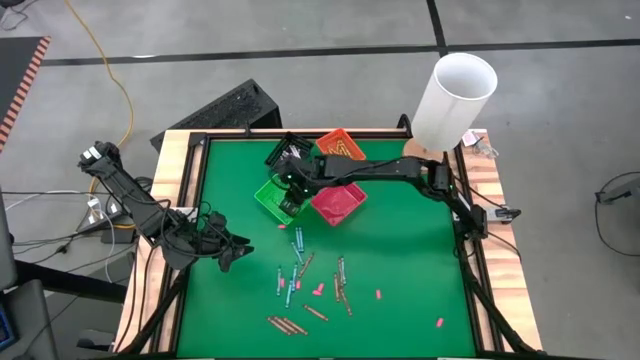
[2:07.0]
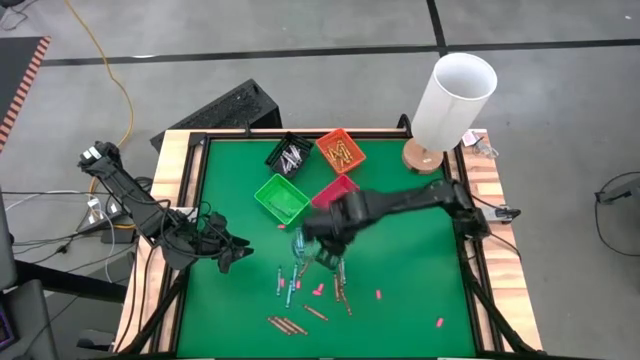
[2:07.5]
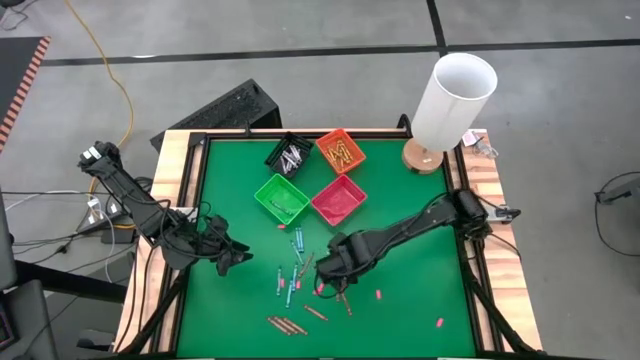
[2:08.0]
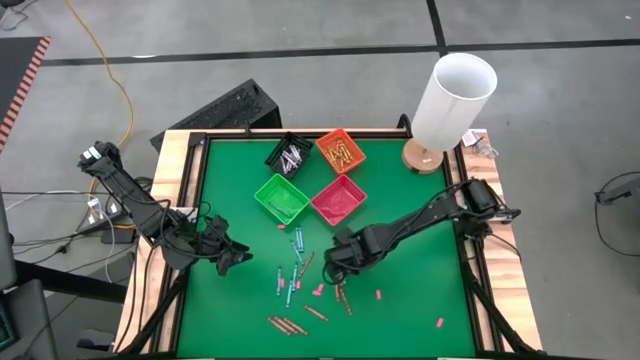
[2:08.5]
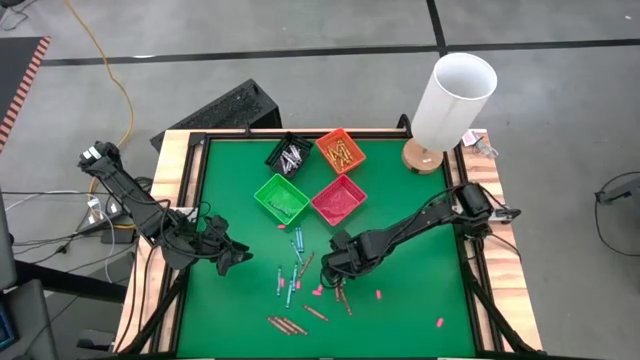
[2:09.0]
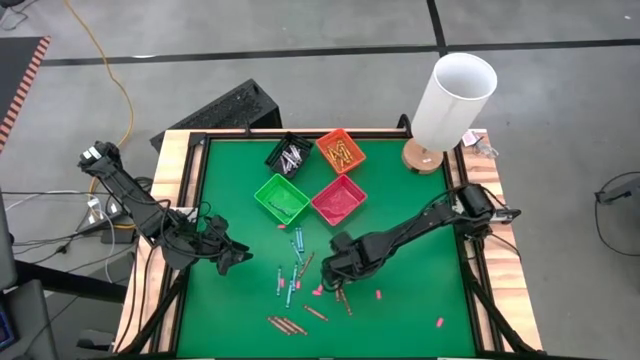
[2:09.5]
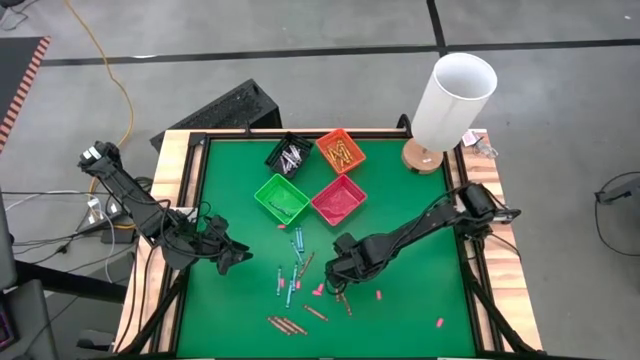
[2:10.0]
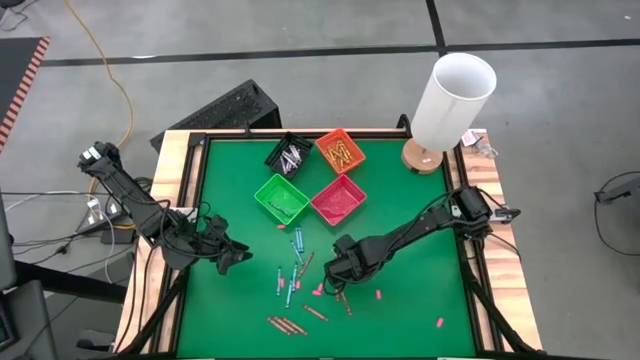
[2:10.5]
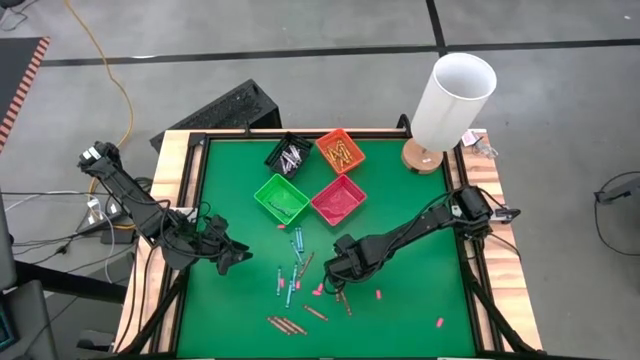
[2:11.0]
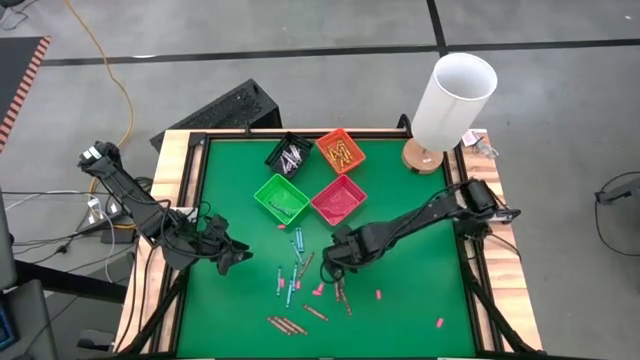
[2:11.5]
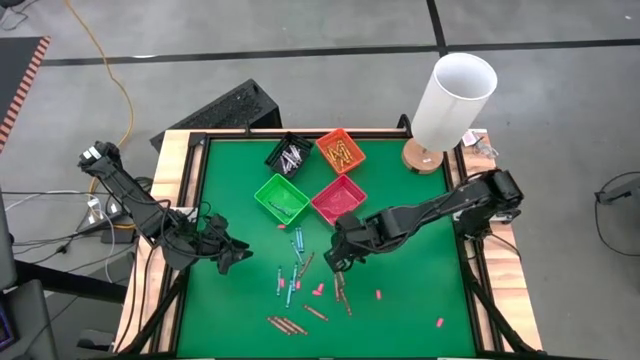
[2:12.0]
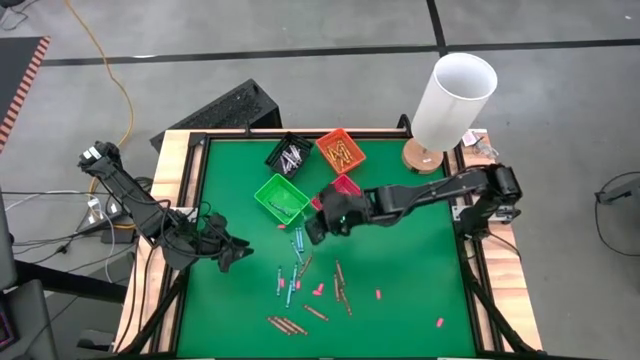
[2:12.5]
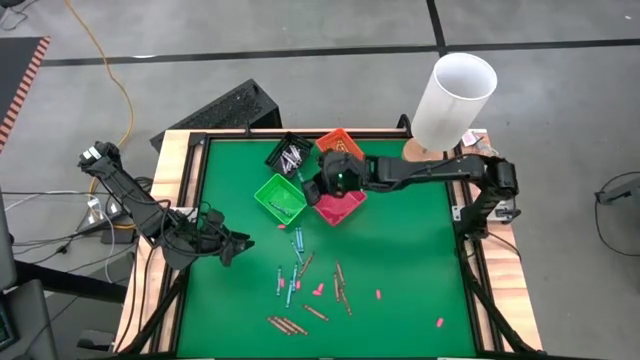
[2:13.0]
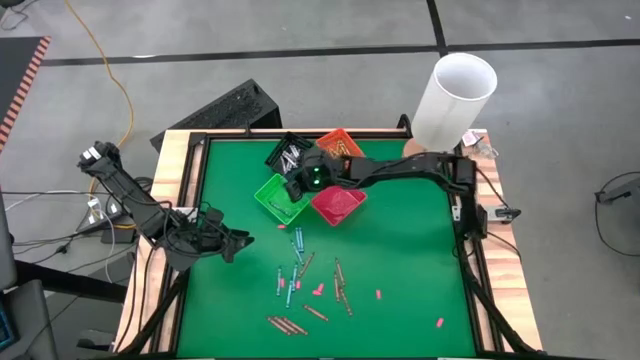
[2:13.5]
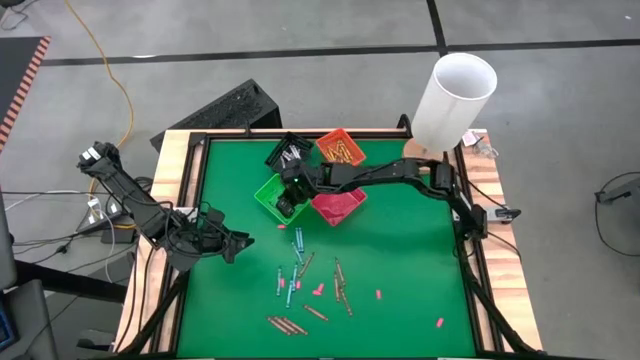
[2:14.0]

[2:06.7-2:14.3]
Task: Sort crayons
Put the blue crayon into the bin

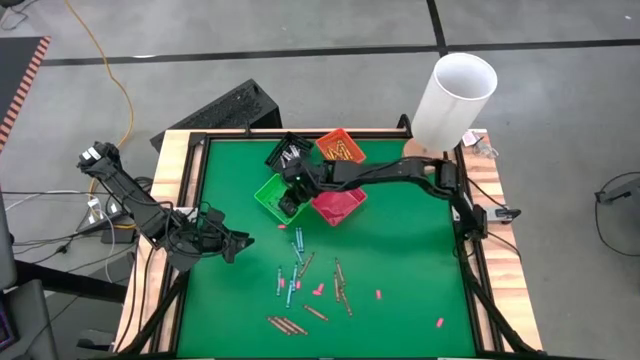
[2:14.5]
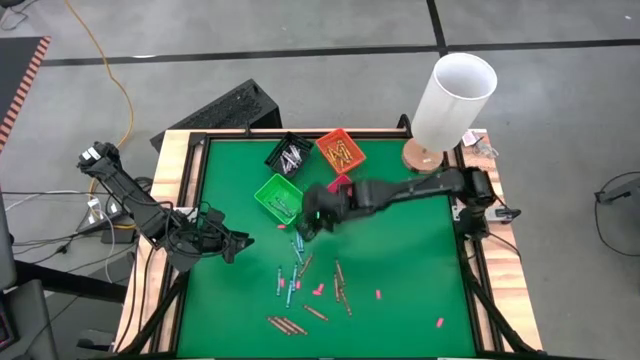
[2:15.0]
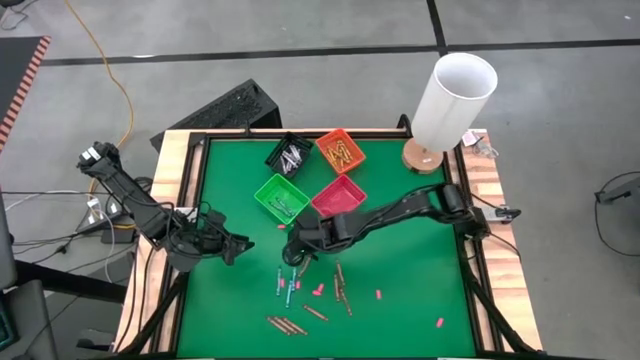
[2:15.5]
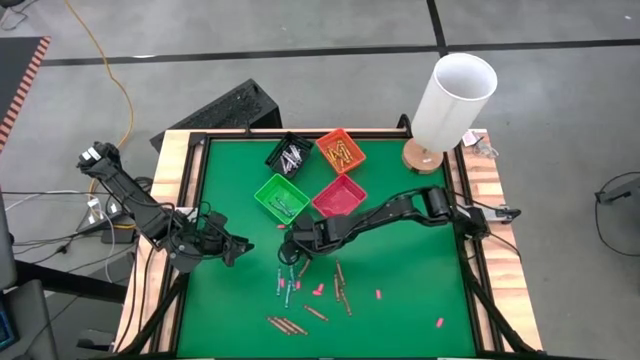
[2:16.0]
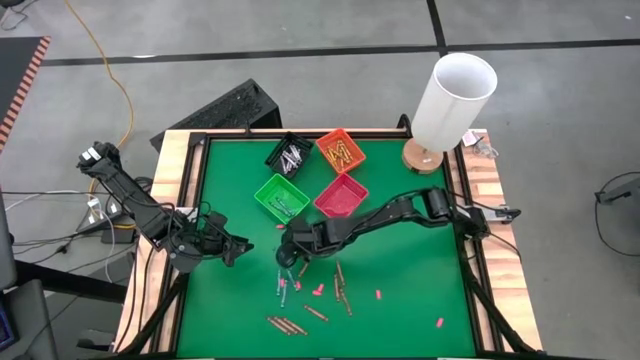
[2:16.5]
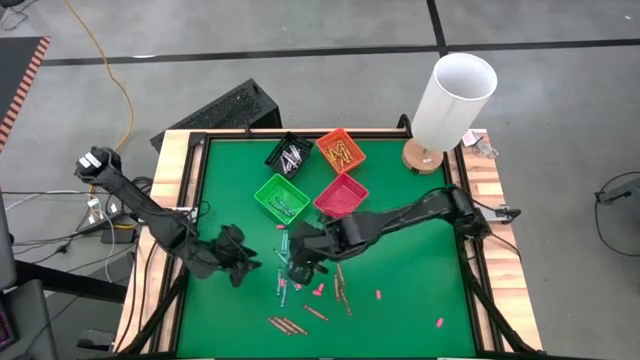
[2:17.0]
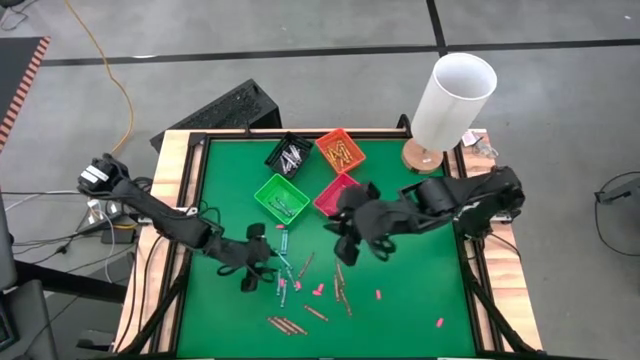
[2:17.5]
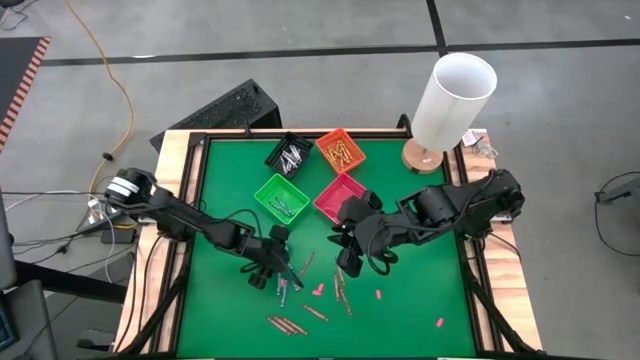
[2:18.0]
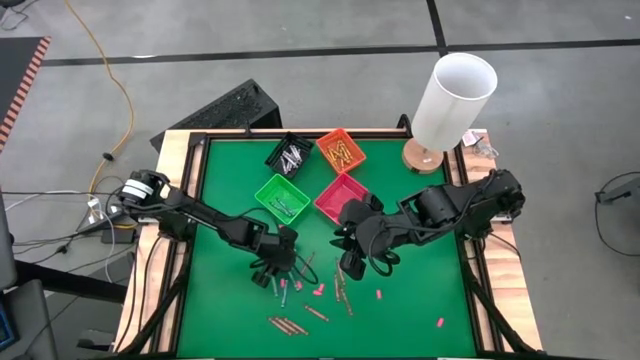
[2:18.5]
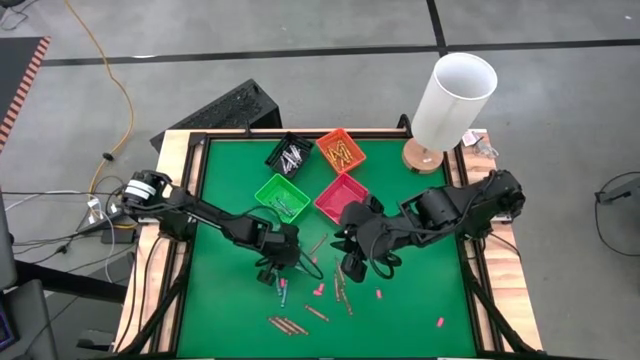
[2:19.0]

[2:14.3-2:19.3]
Put the blue crayon into the bin

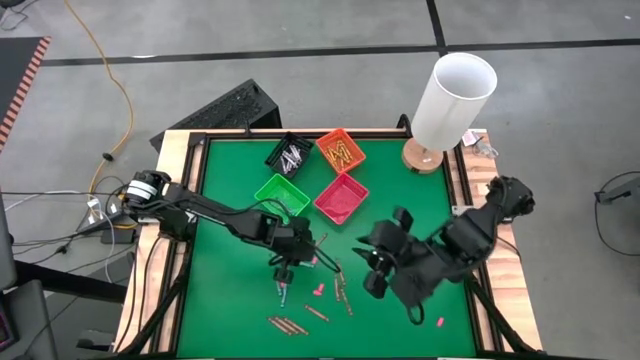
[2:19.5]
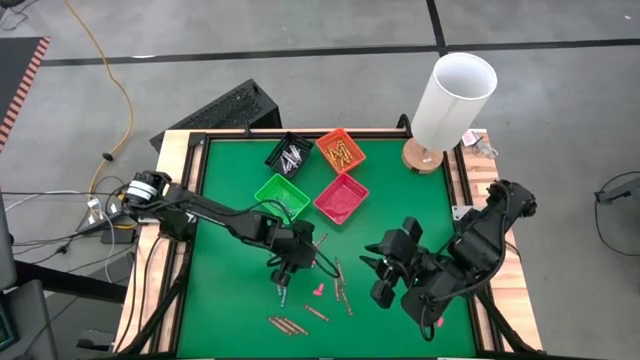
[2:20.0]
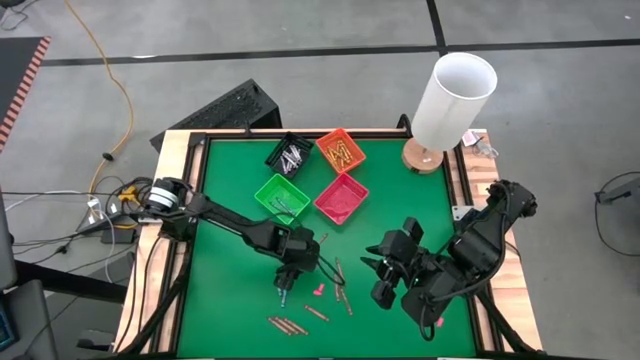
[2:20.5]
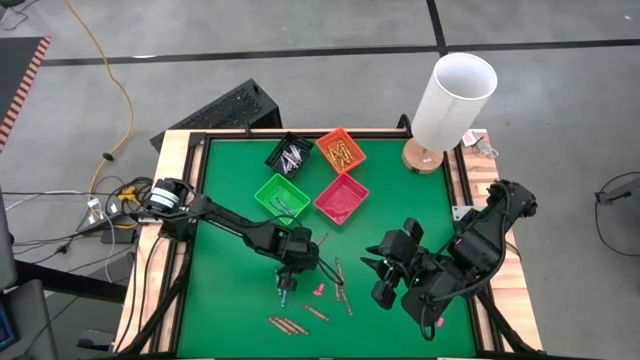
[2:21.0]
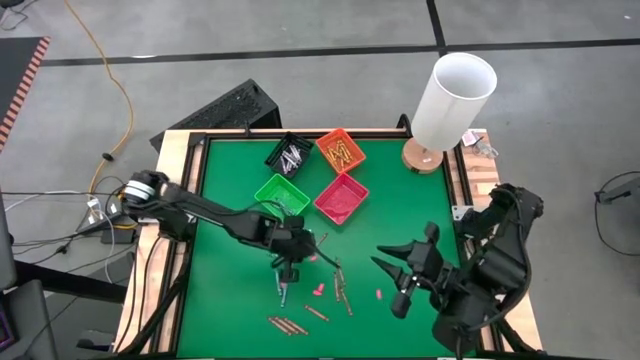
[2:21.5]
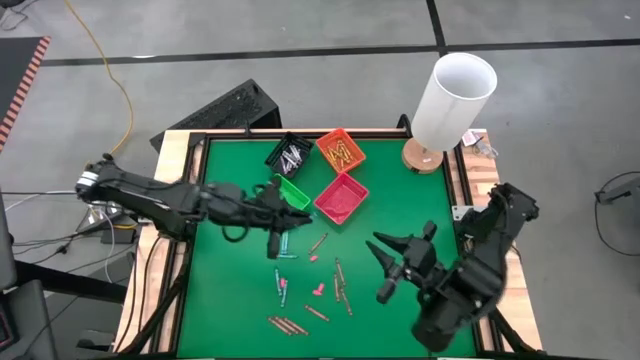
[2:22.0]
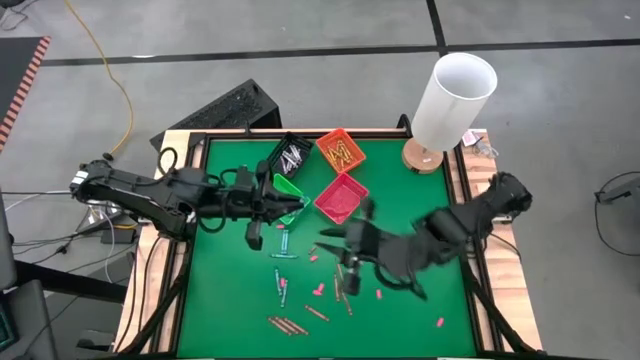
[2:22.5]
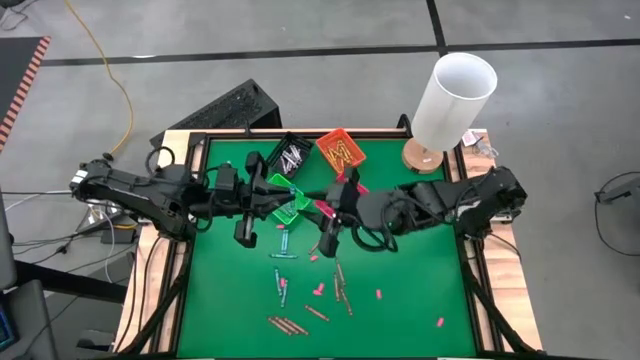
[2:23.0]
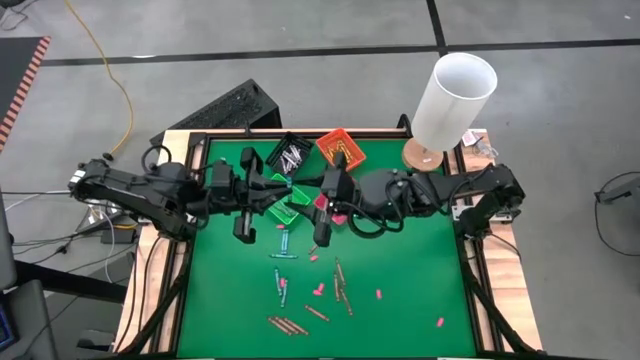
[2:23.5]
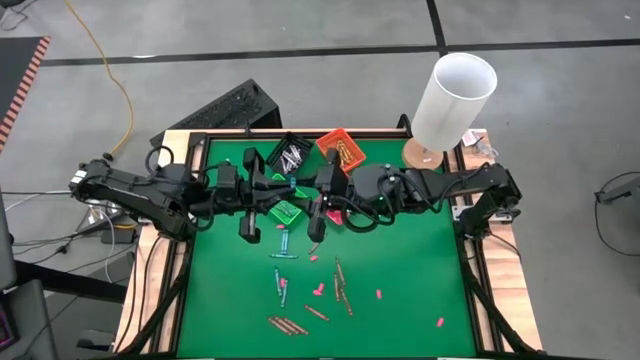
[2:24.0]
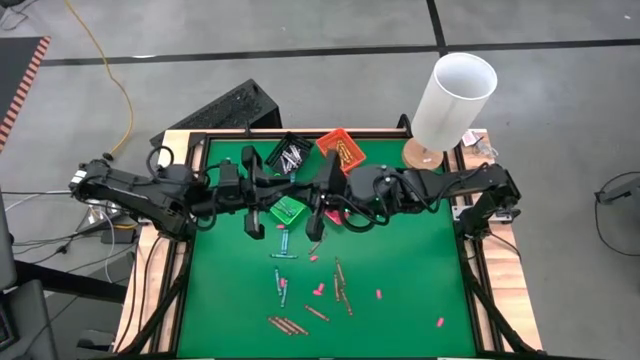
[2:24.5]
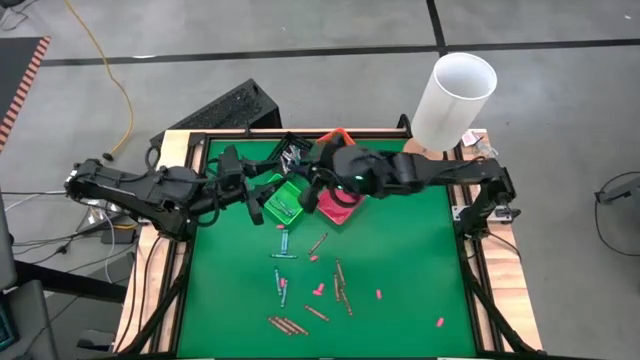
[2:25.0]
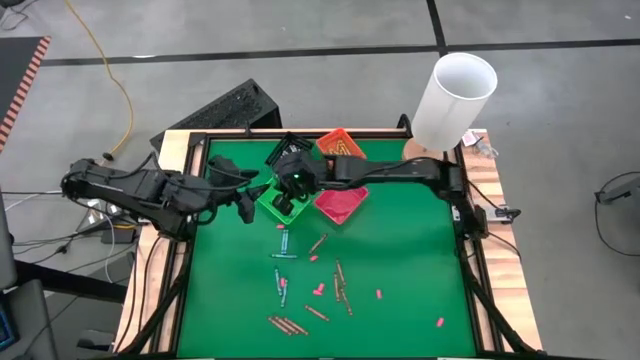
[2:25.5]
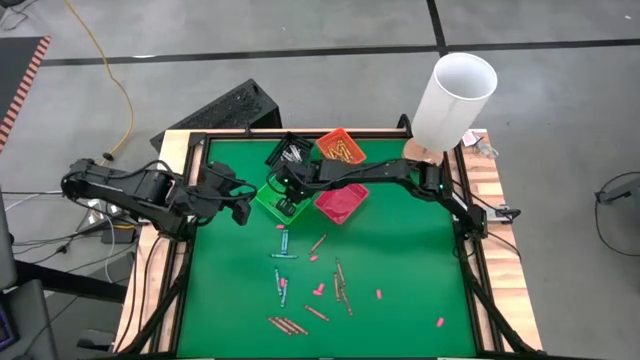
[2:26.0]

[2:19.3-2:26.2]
Put the blue crayon into the bin

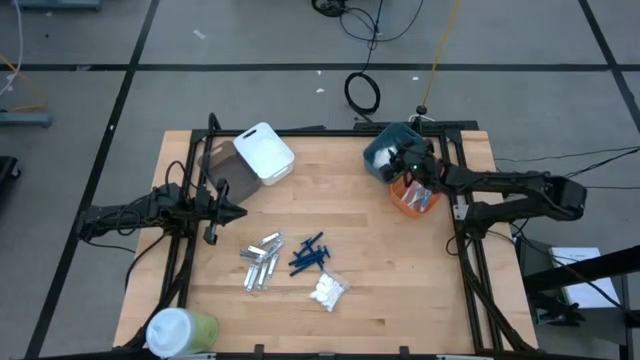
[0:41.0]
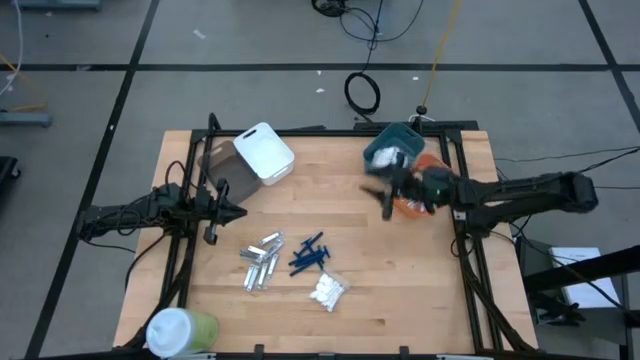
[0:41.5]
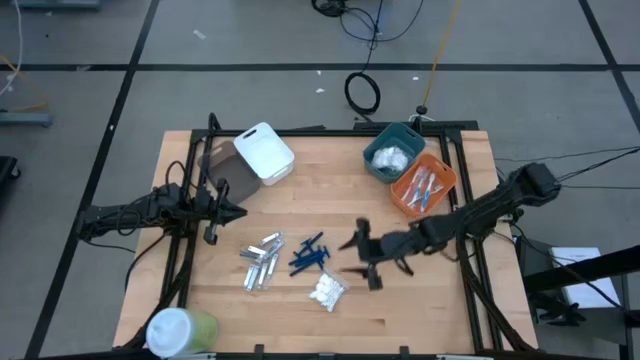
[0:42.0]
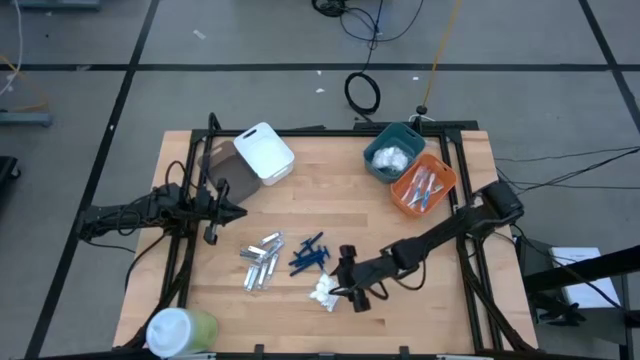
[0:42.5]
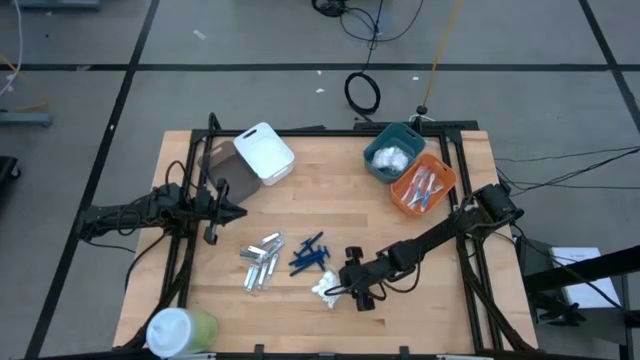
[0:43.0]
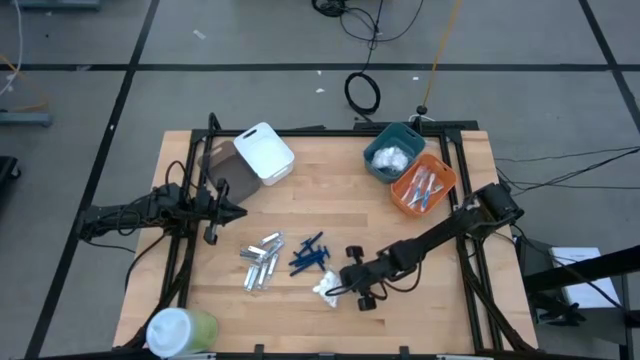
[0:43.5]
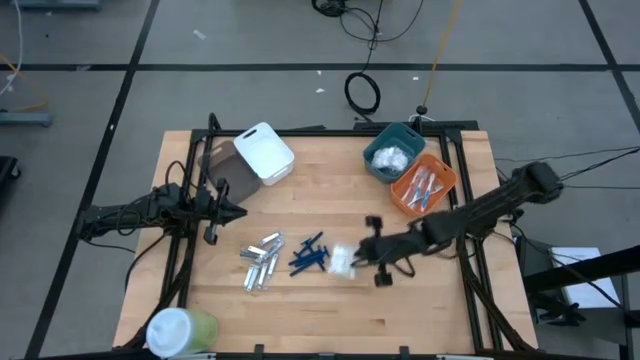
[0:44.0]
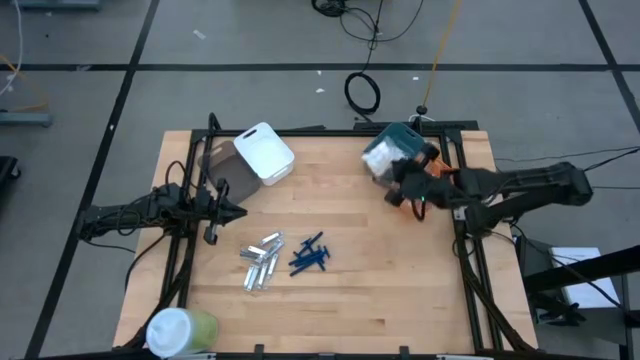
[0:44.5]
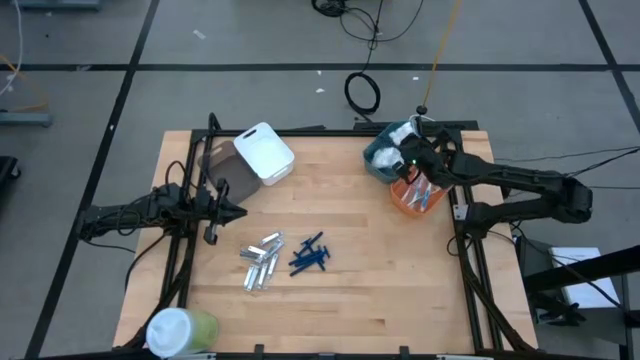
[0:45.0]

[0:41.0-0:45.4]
Task: Pick & Place Travel size toiletries
Put the cotton pack into the green bin
